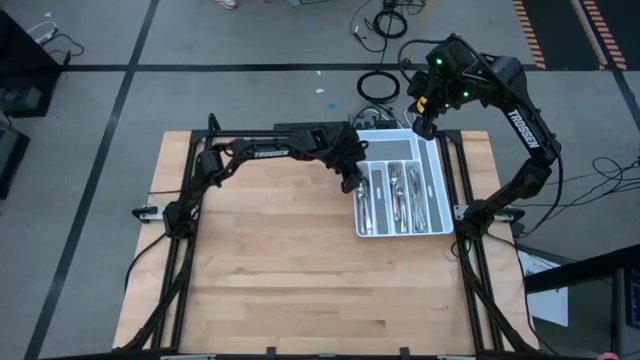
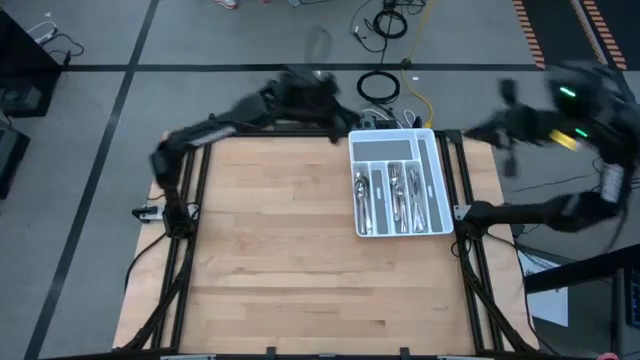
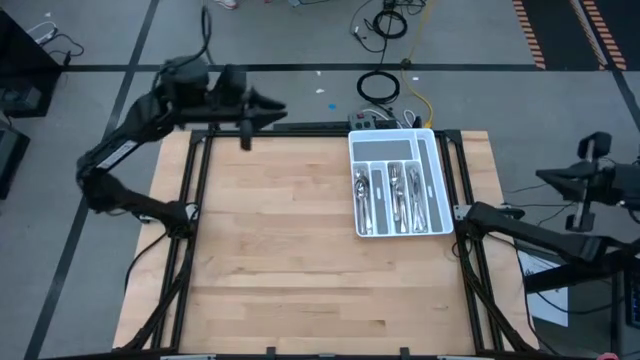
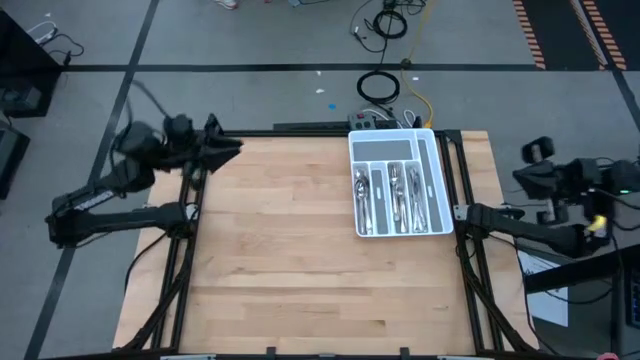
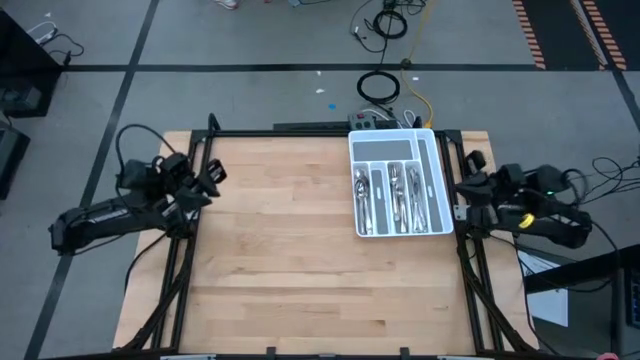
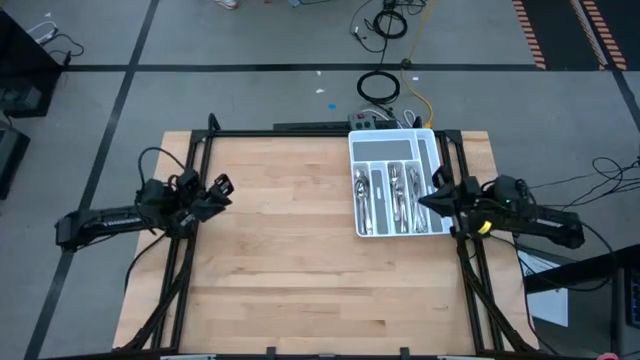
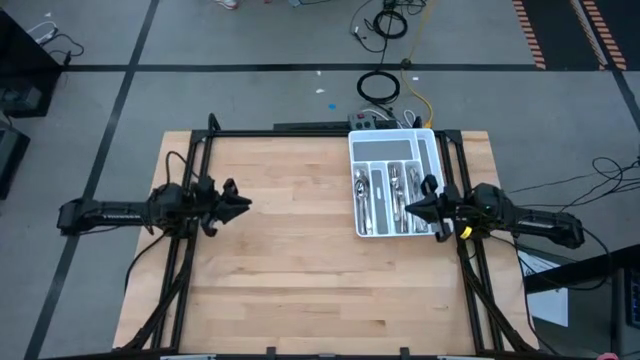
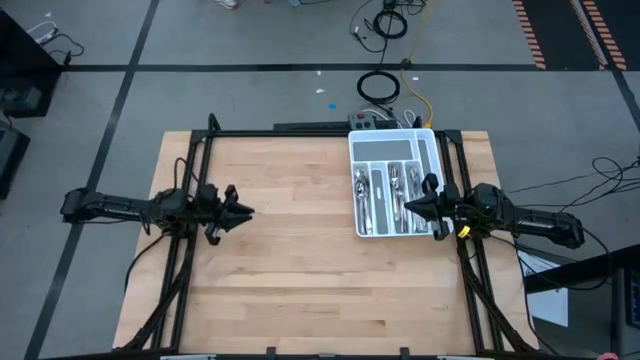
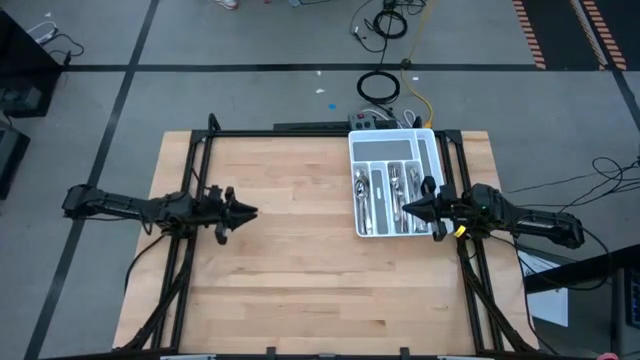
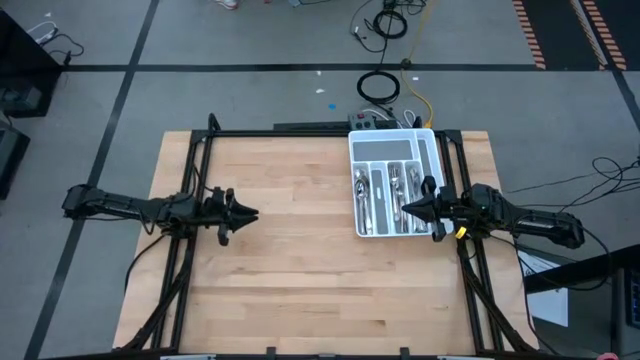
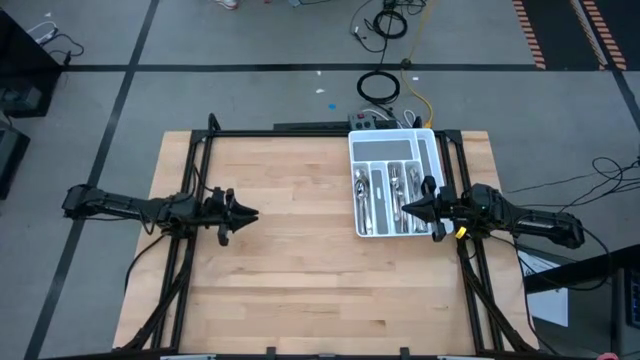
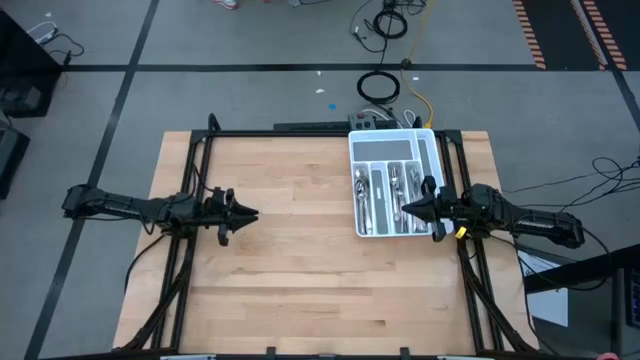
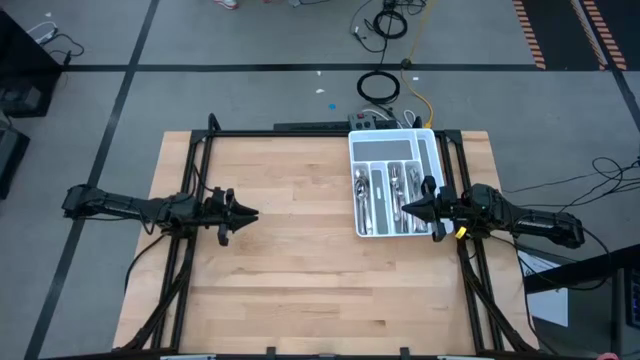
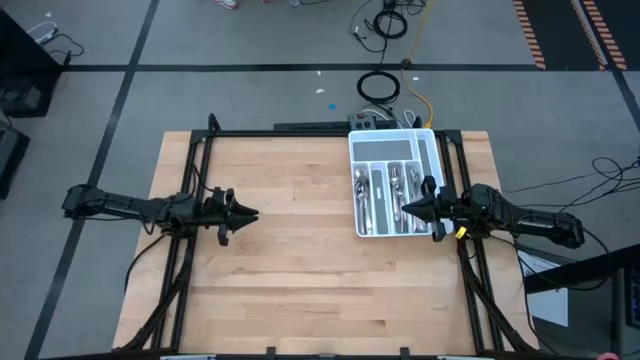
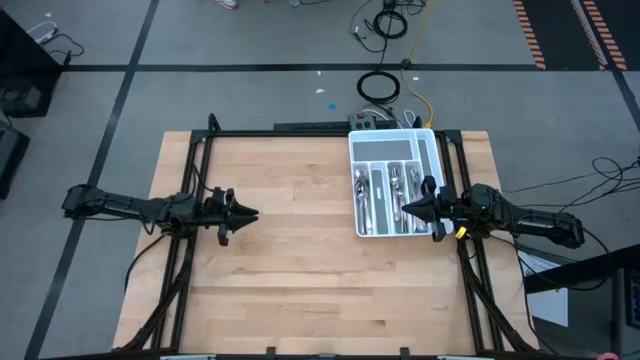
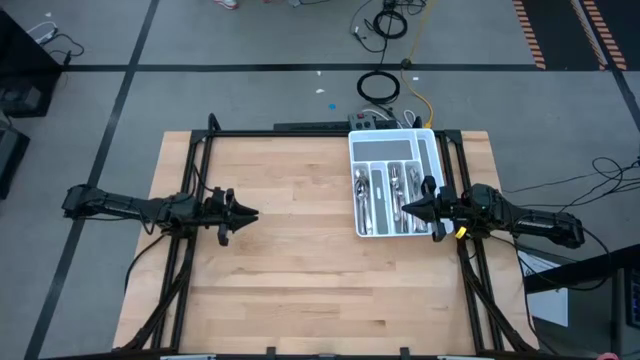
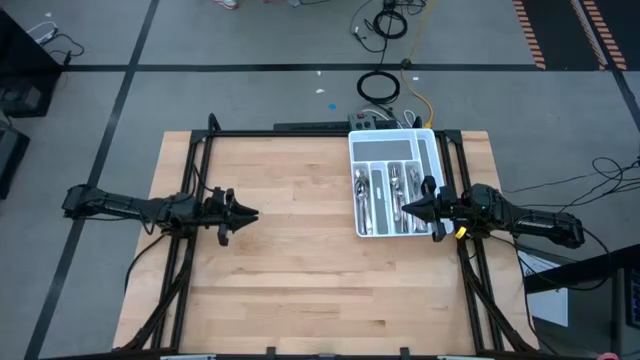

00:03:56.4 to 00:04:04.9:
Task: Sort silverware
Return to Home Position

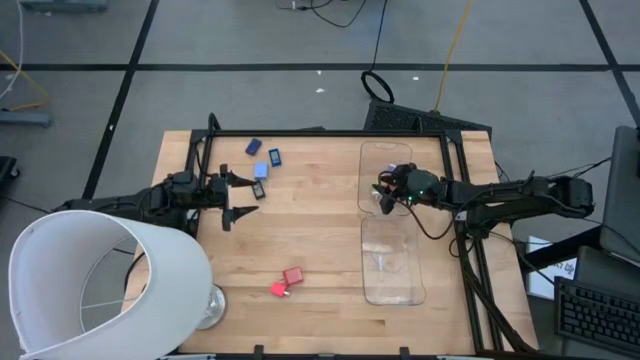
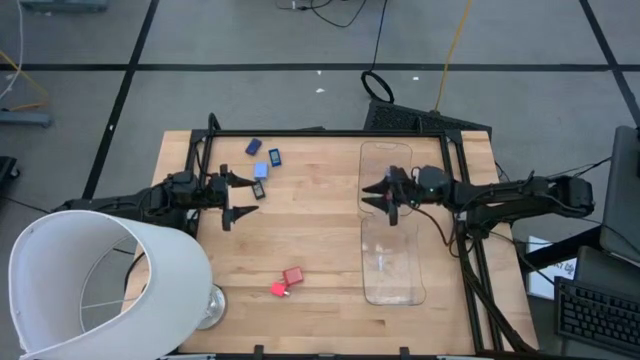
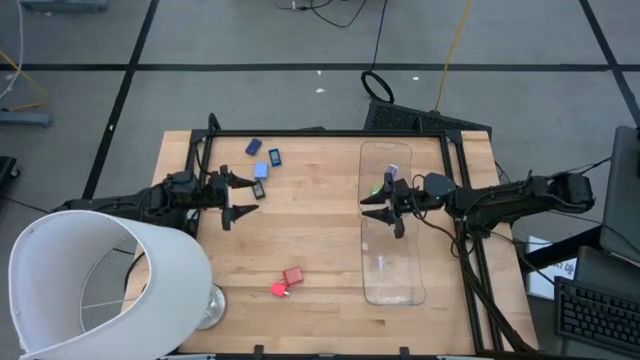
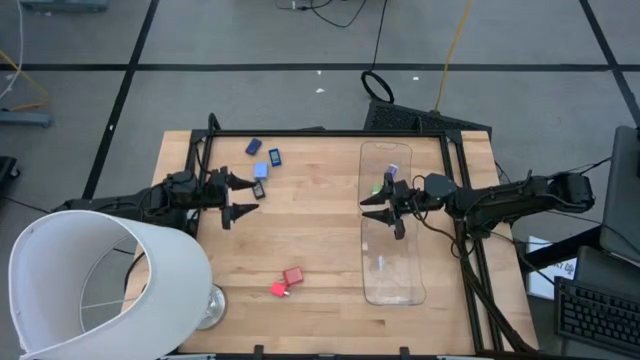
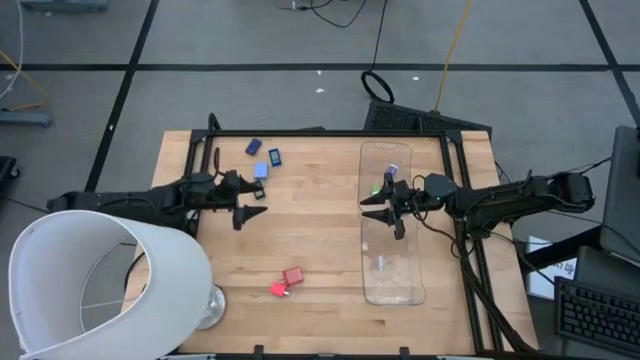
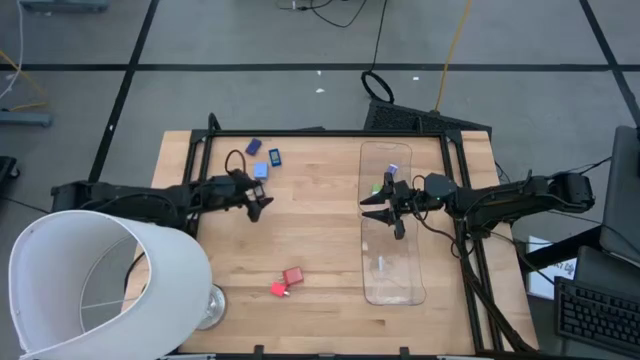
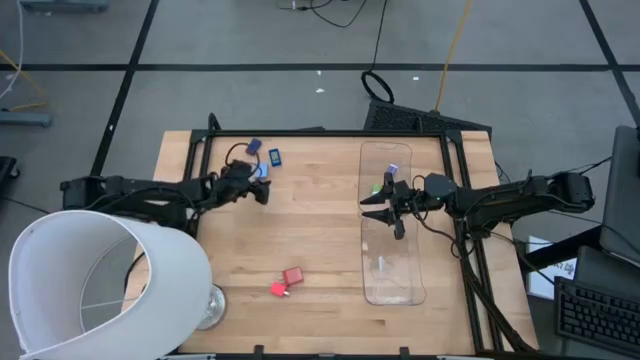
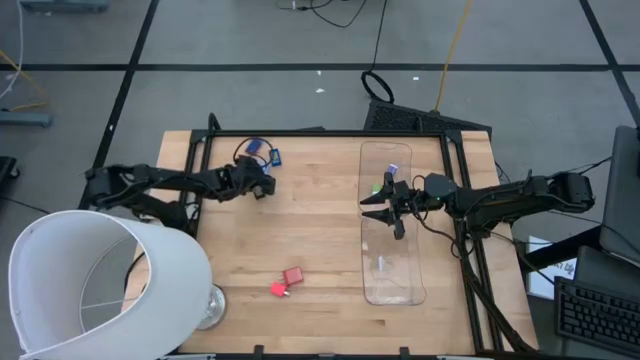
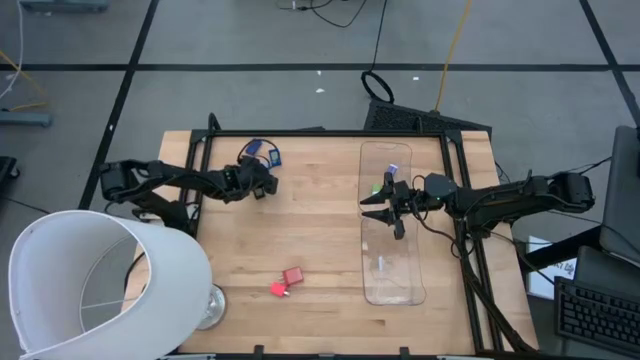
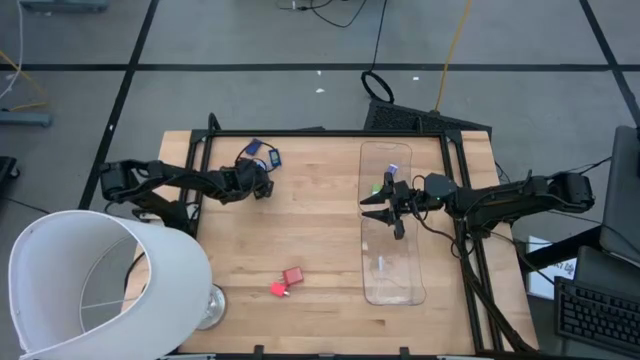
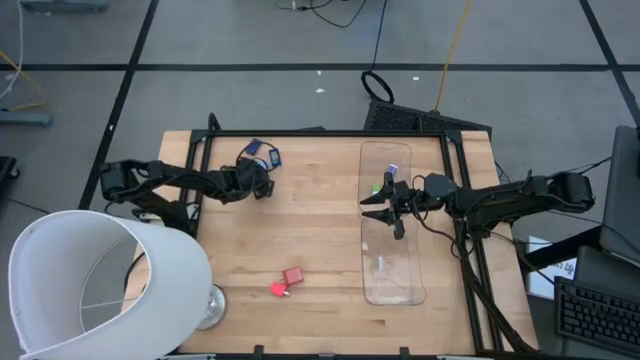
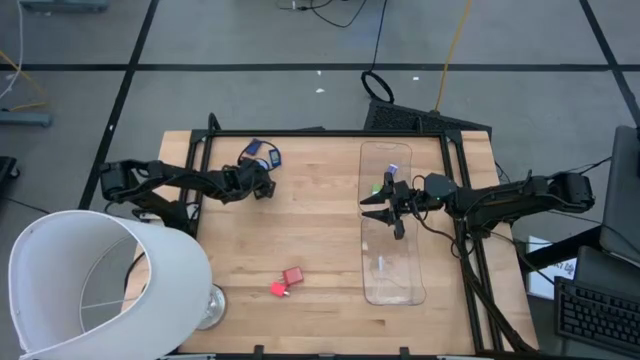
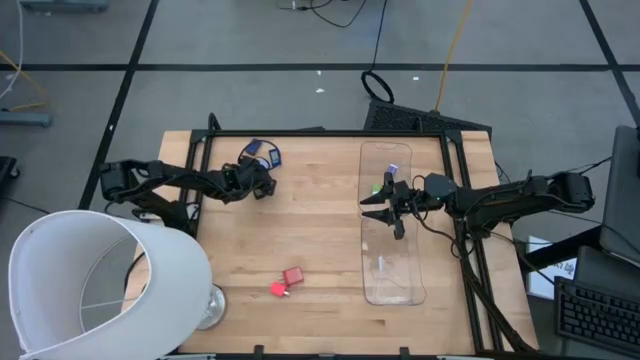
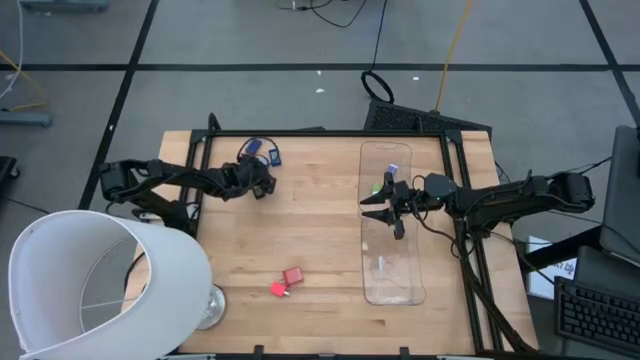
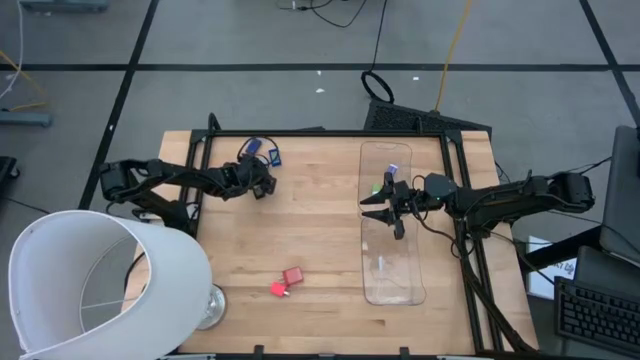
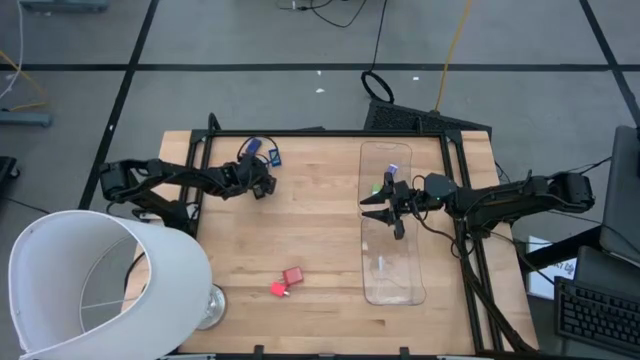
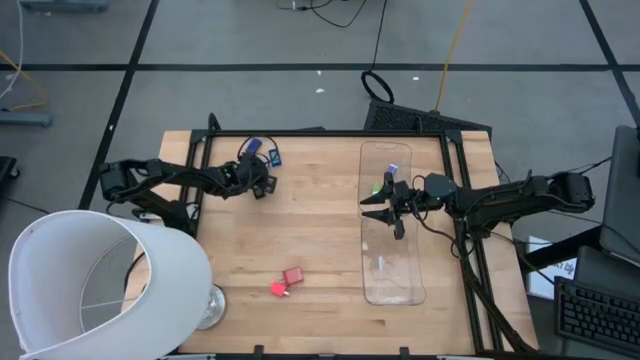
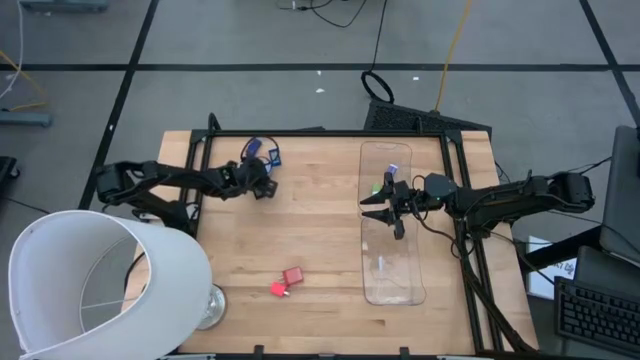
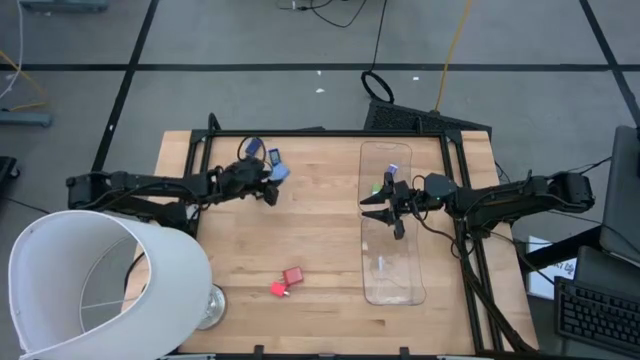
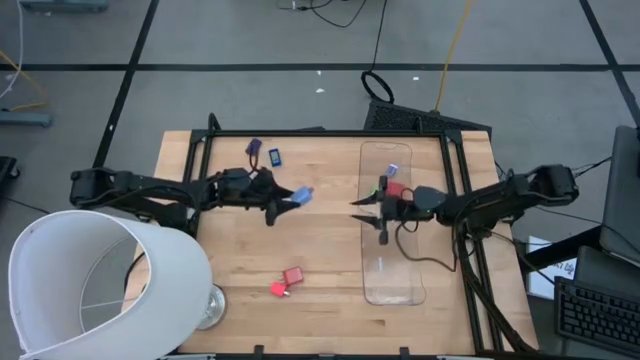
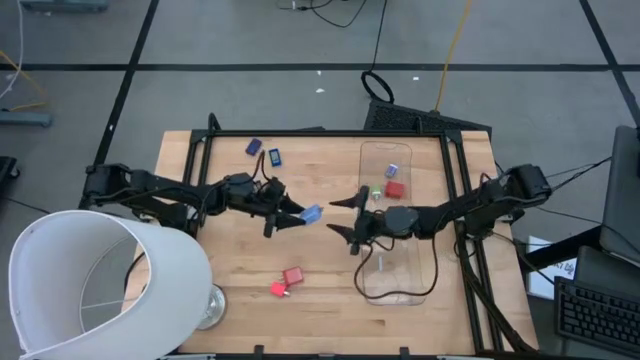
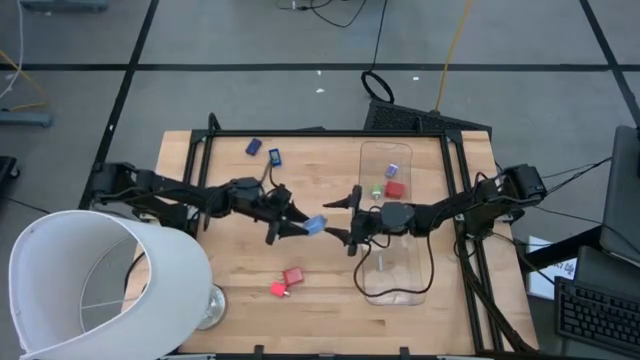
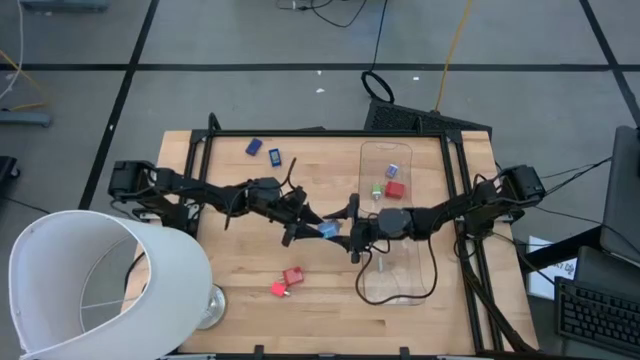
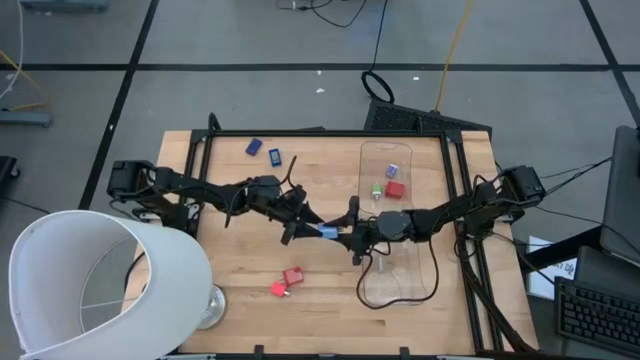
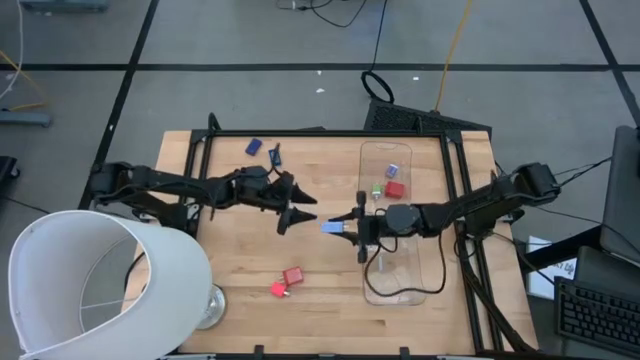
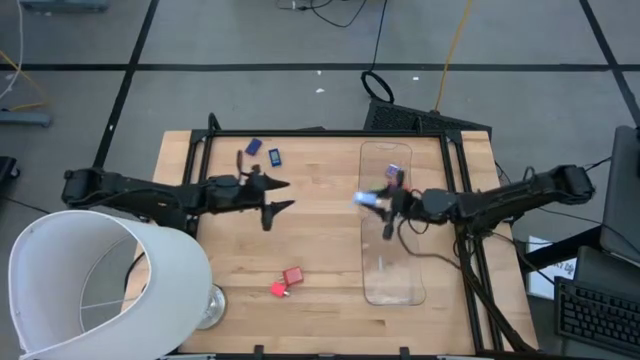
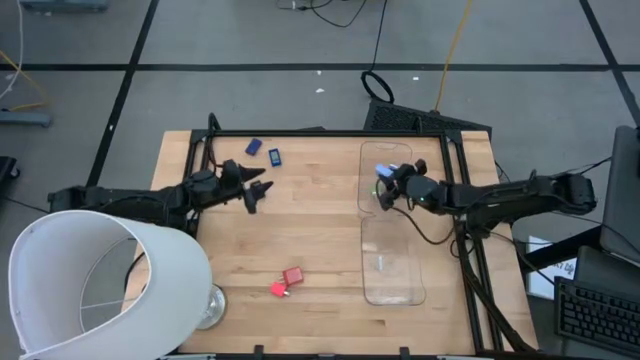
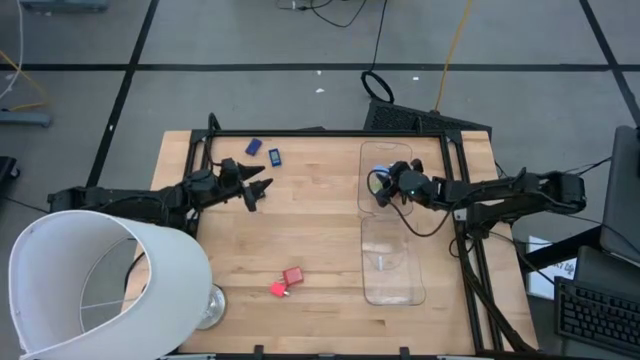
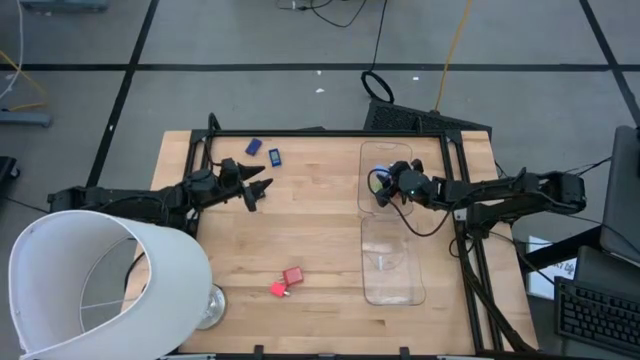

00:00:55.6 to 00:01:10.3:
Task: Pick & Place Office items
Put the light blue charger adapter into the top transparent bin
